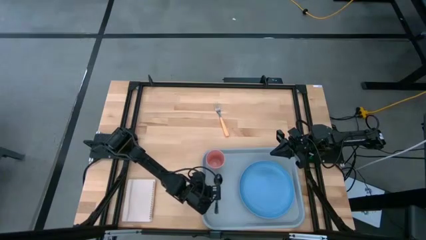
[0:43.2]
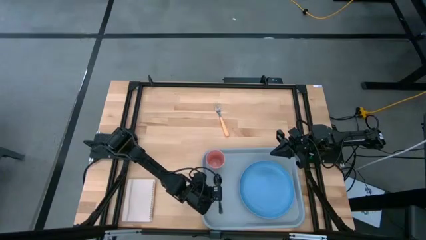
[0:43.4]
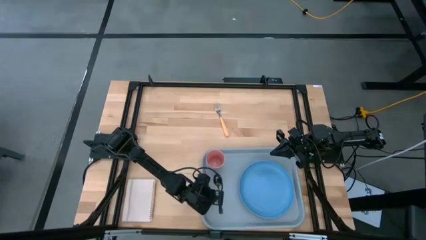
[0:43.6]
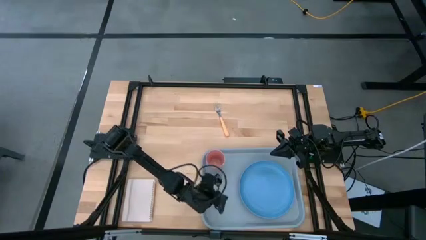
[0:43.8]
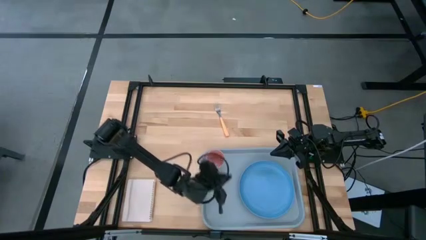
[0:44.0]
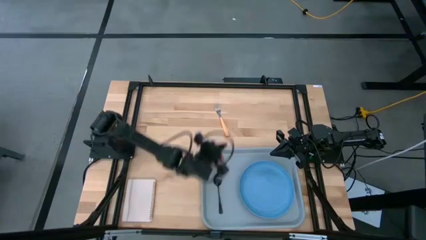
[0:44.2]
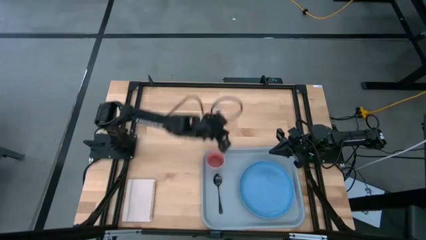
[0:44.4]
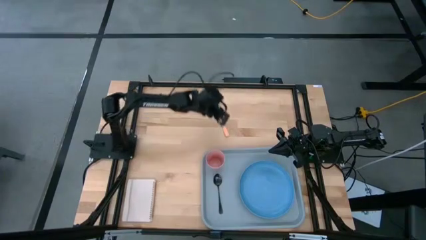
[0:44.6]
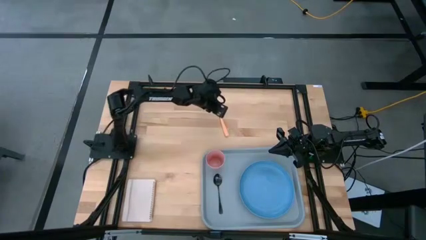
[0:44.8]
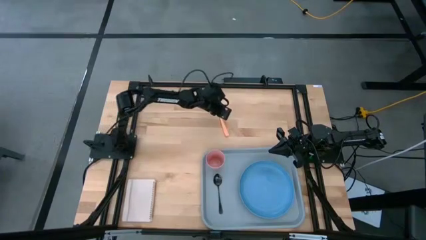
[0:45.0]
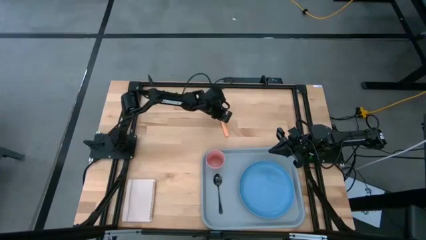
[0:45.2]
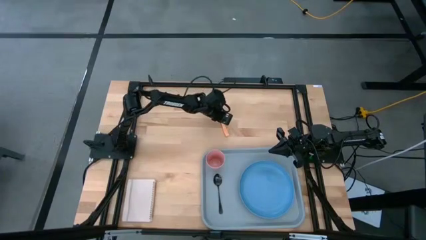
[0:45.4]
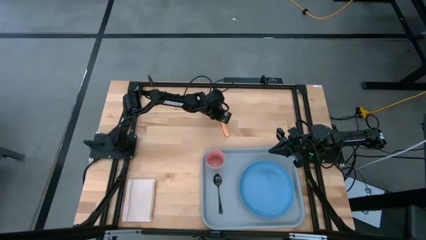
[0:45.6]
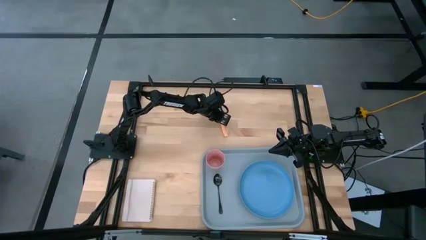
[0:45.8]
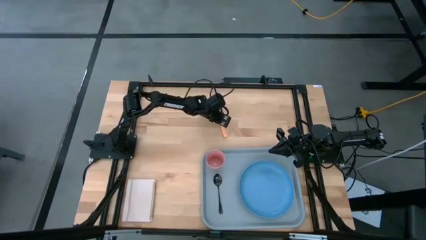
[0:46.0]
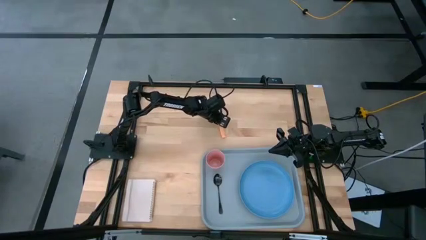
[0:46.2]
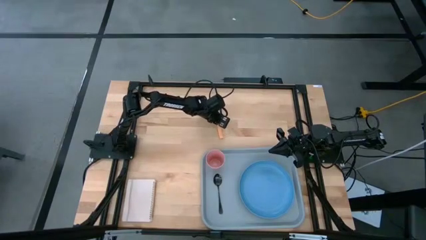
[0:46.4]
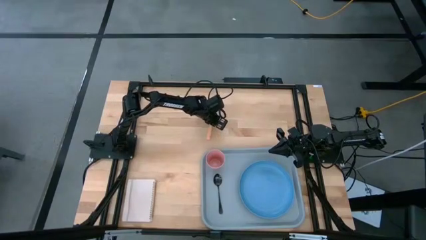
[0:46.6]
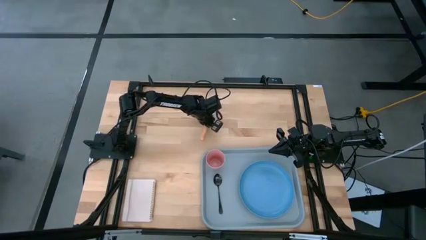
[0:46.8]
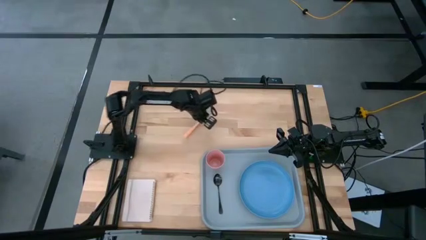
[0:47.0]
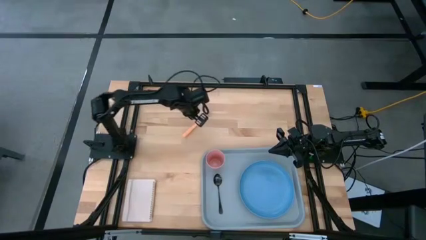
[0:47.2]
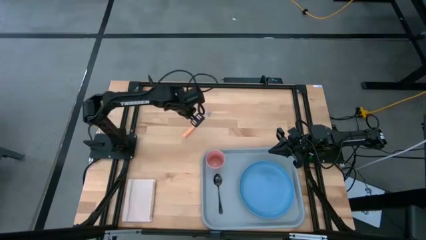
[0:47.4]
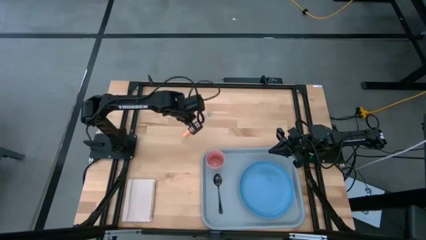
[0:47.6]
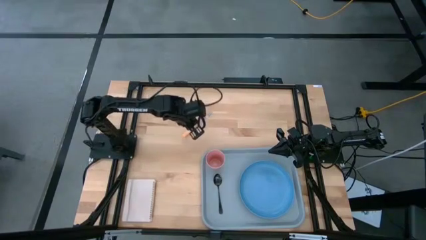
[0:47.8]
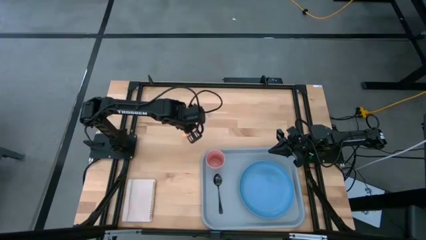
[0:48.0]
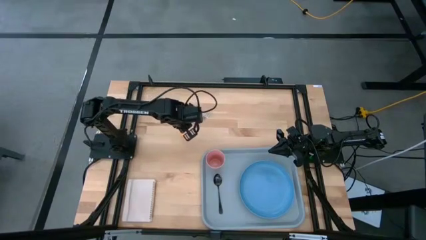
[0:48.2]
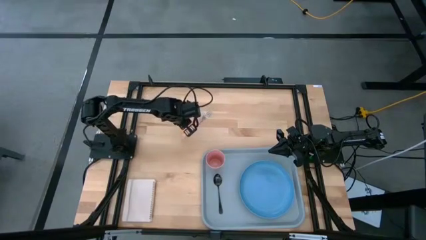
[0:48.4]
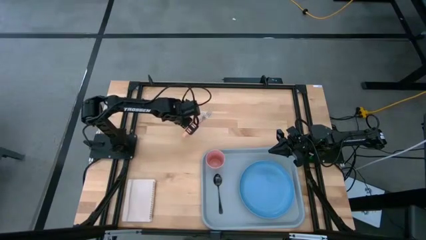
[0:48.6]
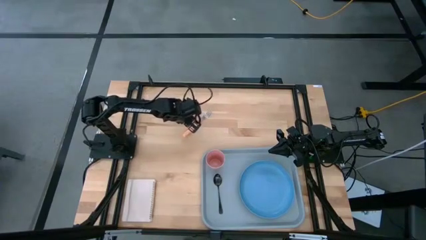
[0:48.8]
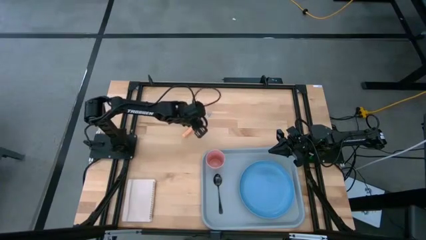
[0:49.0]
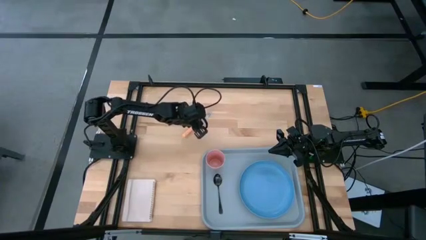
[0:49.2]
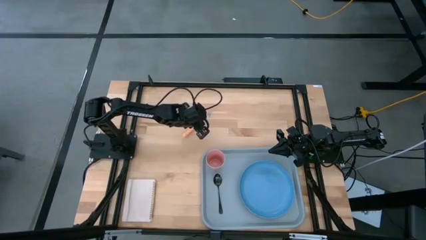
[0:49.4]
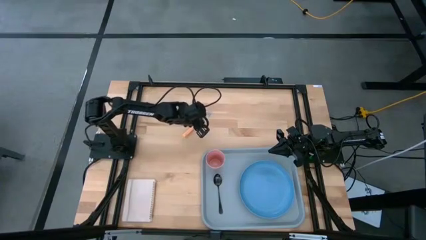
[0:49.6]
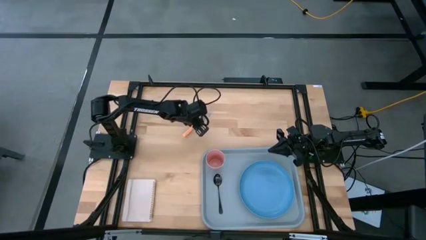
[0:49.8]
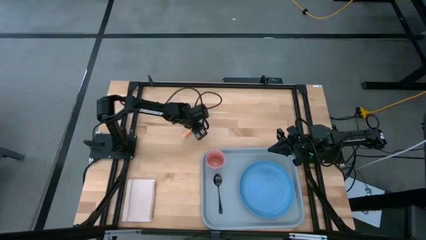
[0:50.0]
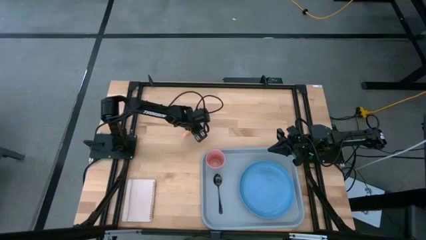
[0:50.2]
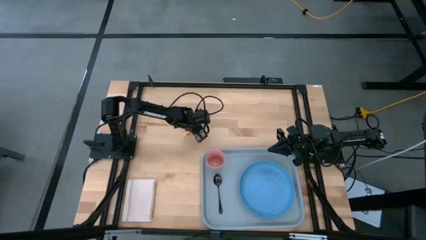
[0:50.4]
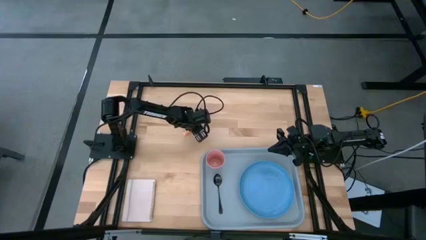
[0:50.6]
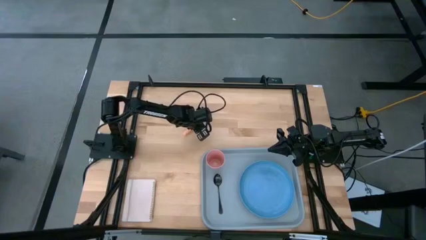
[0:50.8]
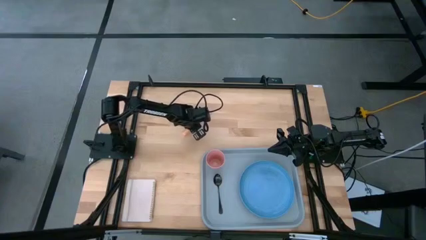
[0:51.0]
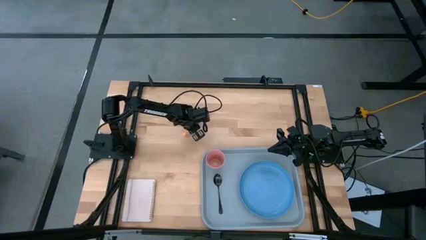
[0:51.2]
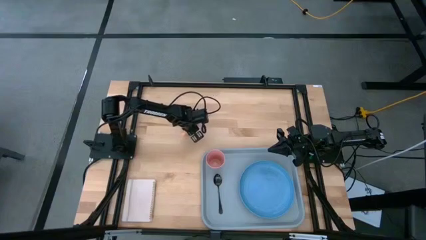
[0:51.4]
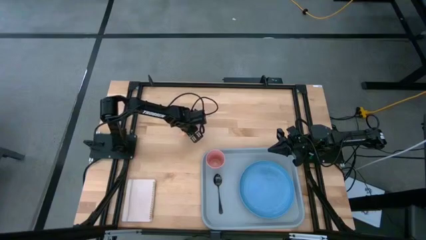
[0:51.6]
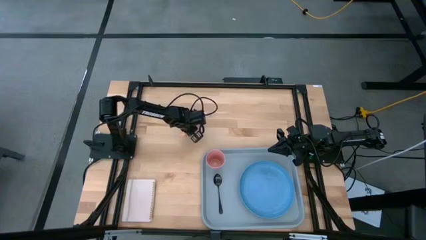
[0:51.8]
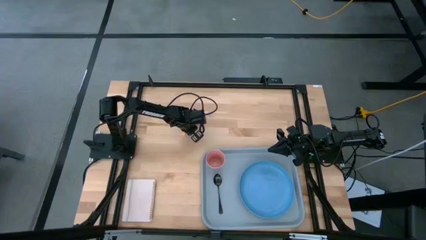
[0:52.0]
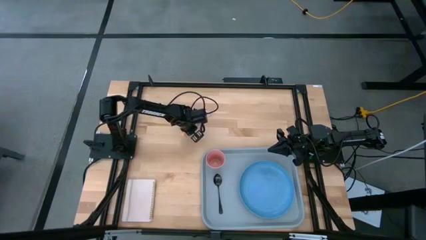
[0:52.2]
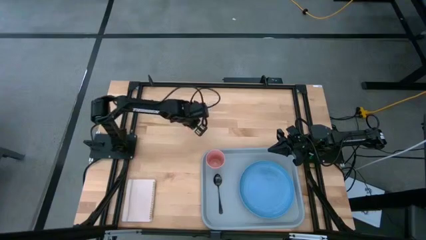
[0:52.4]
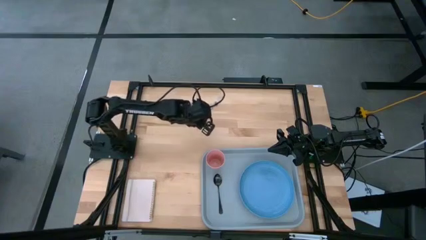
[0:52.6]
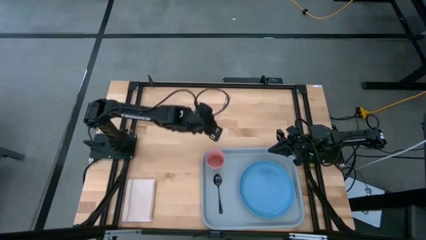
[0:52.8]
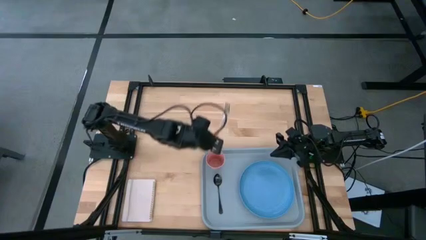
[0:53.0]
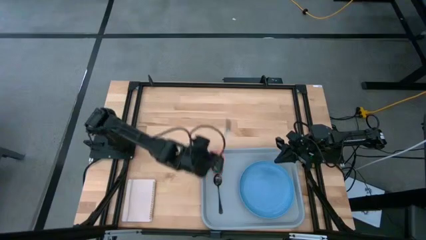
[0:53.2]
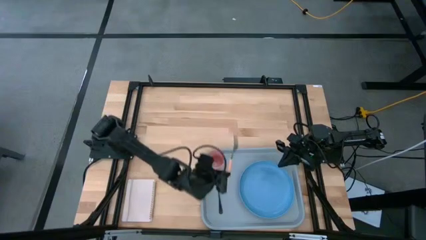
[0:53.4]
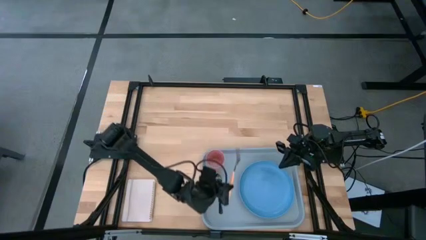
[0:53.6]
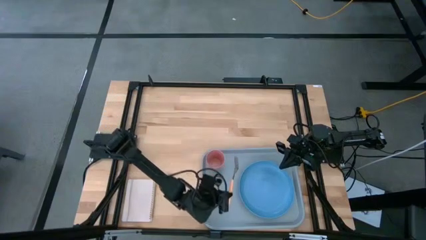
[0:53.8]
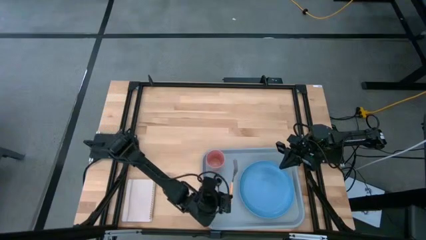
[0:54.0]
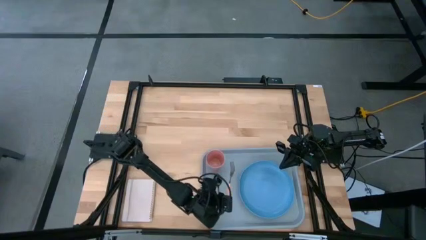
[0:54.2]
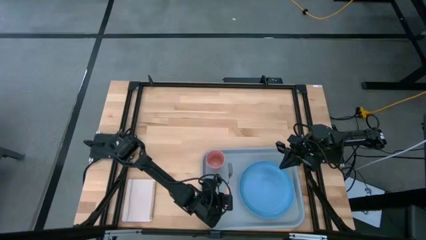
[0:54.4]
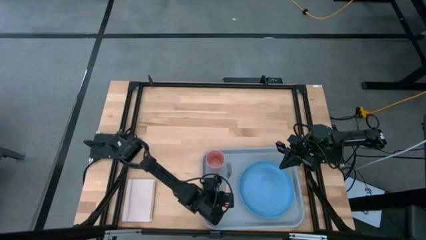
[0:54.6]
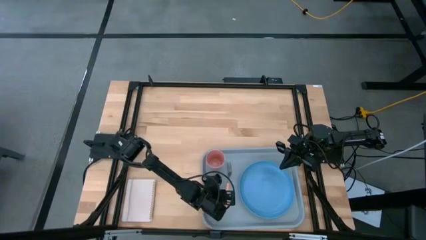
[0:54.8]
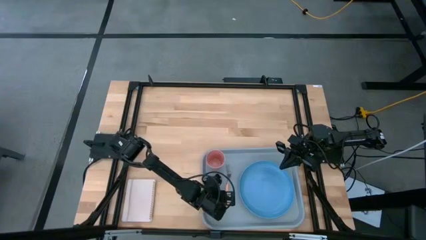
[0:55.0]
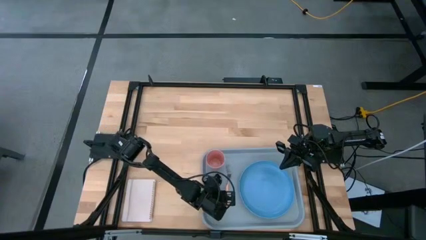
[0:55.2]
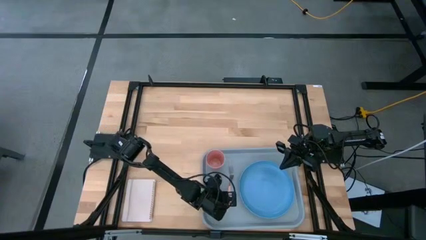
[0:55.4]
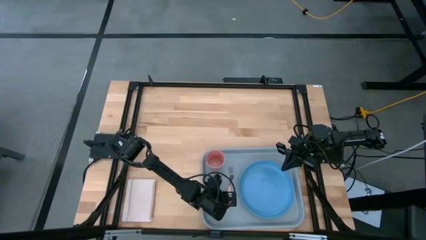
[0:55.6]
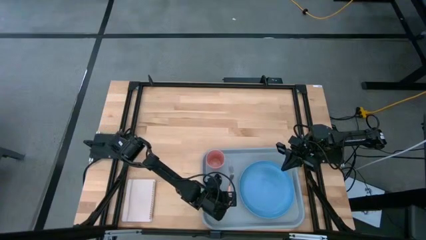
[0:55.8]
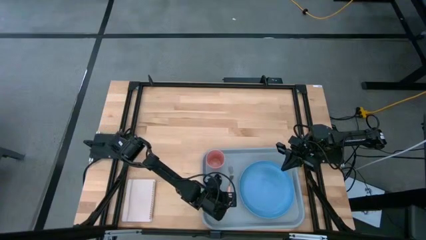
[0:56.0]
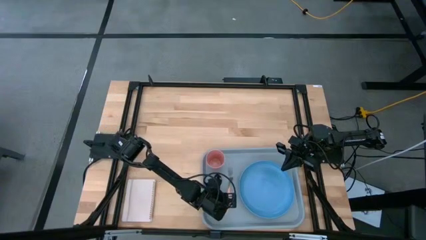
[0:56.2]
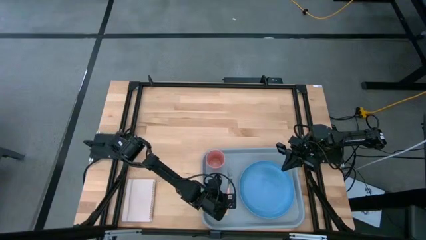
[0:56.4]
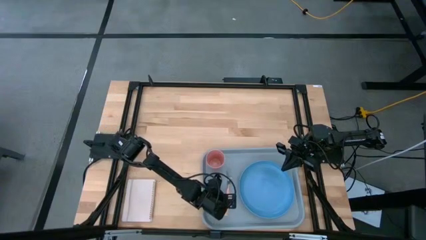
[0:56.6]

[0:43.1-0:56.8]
Task: Pick and place plate/cup/fork/spoon on tray
Put the orange fork on the gray tray between the black spoon and blue plate

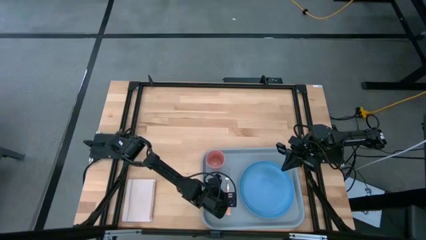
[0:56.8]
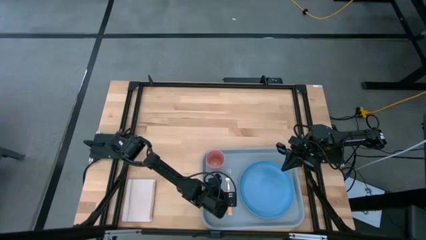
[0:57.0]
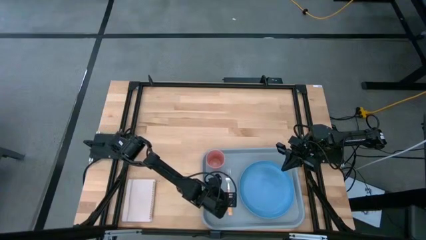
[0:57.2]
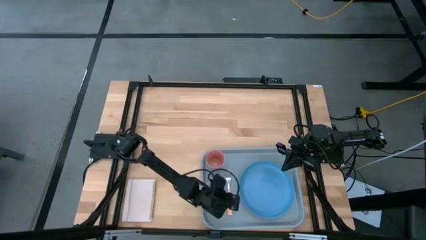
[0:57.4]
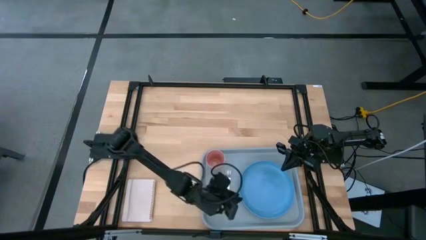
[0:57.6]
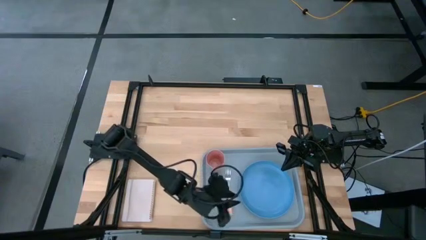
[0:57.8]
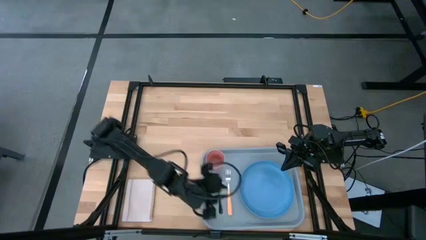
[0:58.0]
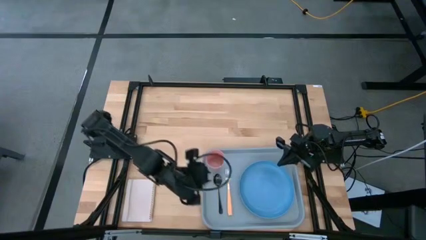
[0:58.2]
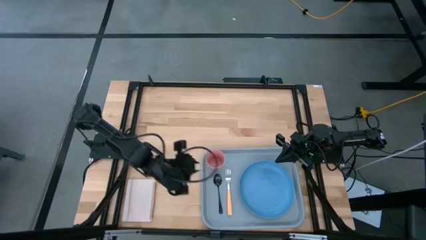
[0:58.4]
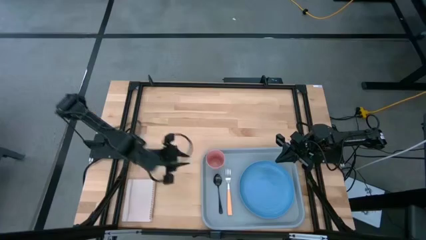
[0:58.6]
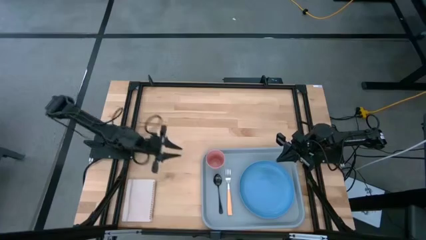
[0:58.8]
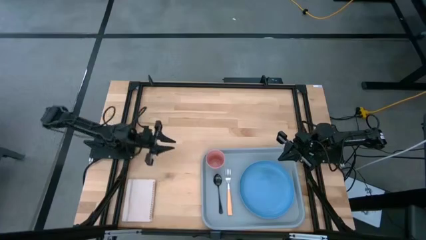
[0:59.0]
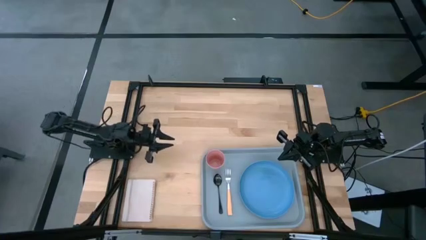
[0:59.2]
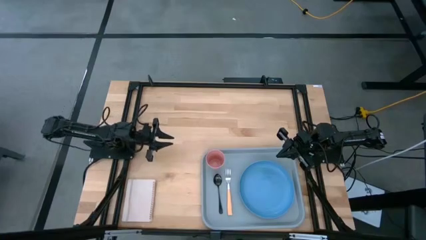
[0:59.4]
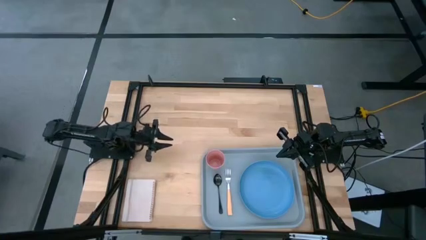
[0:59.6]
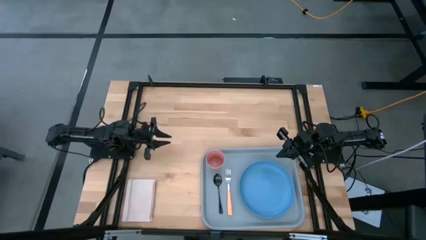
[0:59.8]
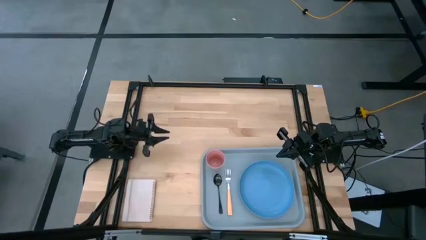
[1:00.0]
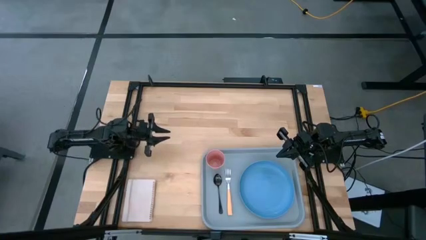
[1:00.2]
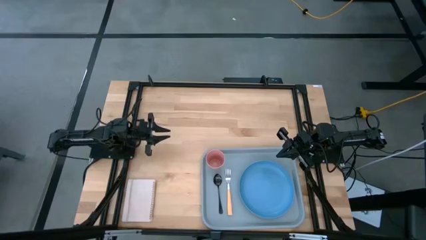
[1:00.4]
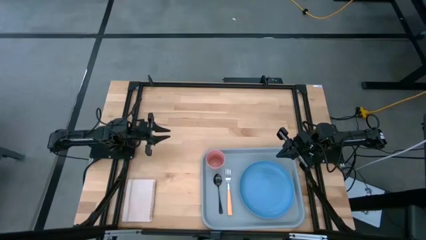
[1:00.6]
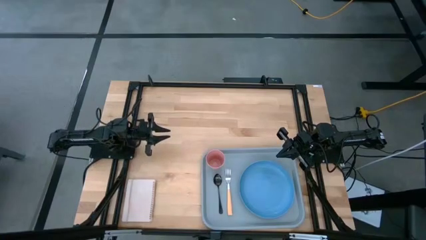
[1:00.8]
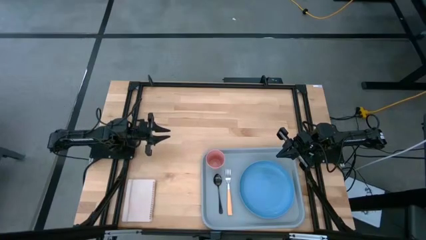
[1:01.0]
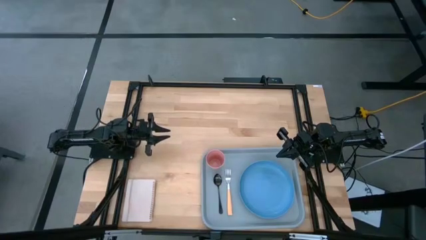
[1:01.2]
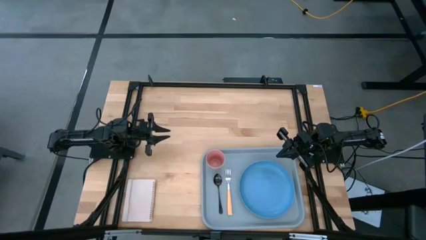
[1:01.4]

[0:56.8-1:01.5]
Return to Home Position
